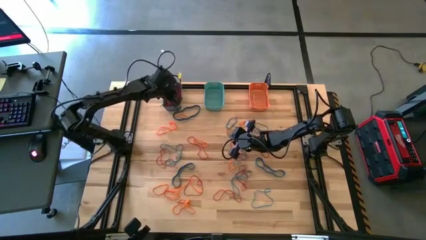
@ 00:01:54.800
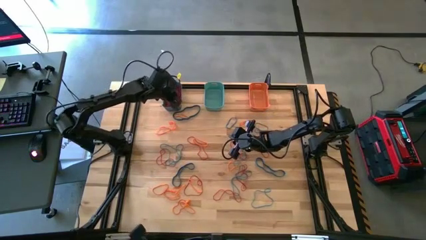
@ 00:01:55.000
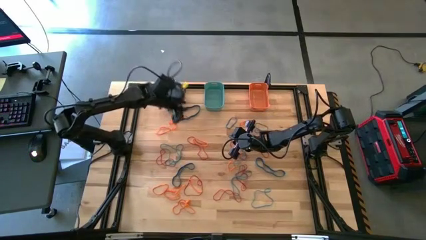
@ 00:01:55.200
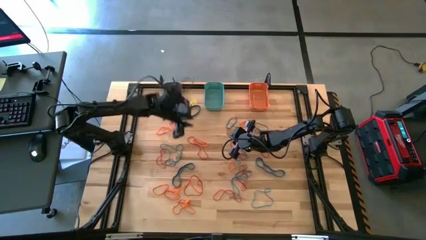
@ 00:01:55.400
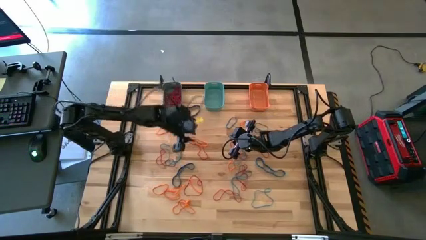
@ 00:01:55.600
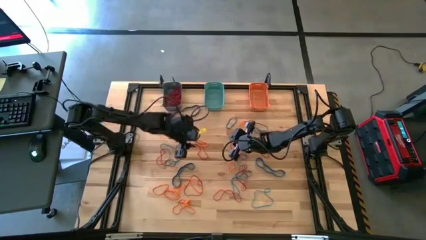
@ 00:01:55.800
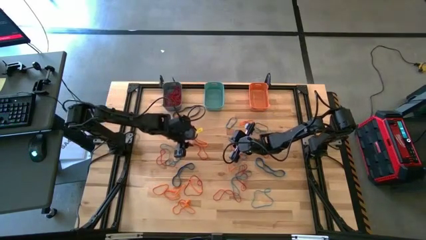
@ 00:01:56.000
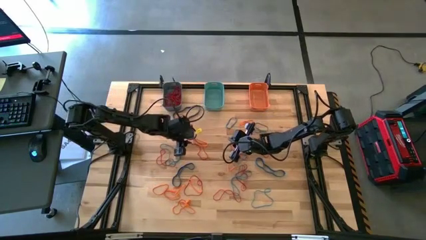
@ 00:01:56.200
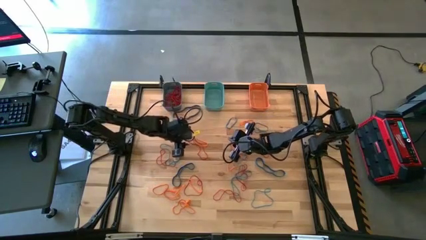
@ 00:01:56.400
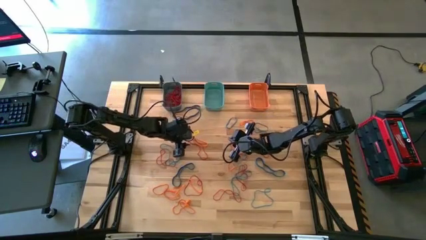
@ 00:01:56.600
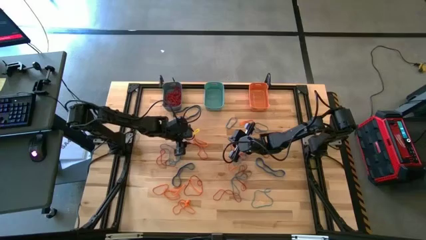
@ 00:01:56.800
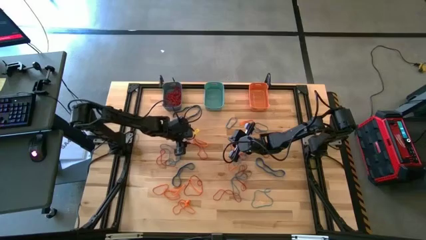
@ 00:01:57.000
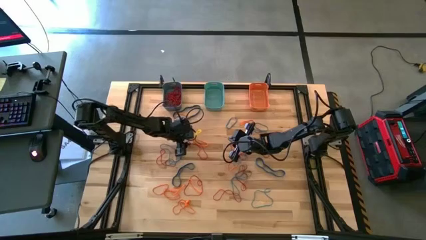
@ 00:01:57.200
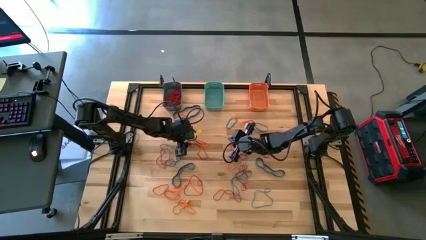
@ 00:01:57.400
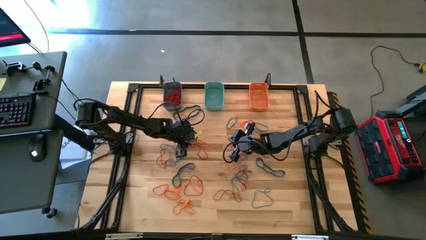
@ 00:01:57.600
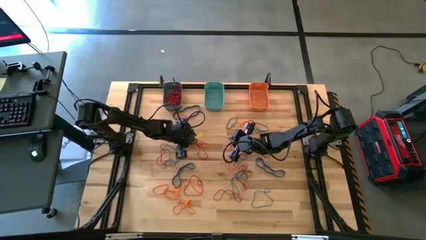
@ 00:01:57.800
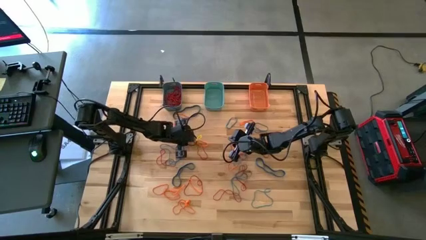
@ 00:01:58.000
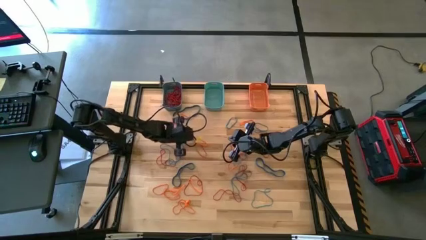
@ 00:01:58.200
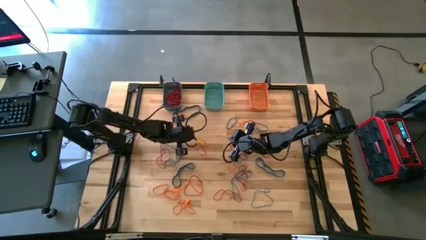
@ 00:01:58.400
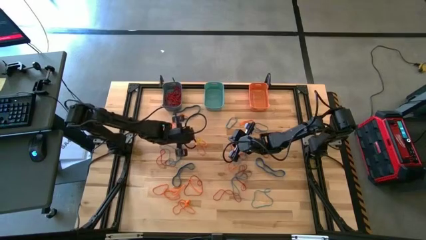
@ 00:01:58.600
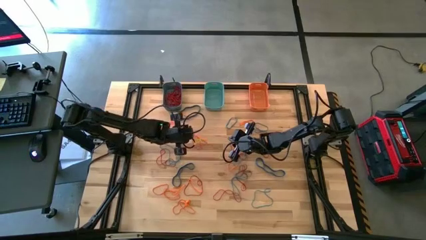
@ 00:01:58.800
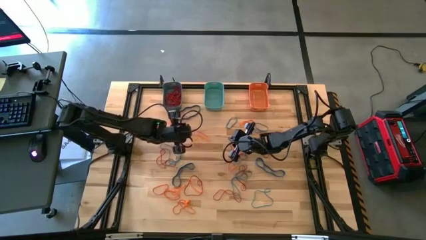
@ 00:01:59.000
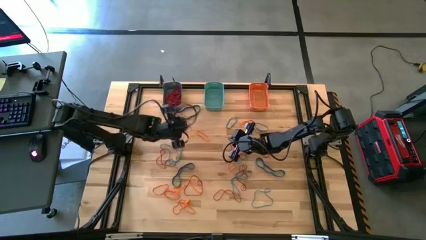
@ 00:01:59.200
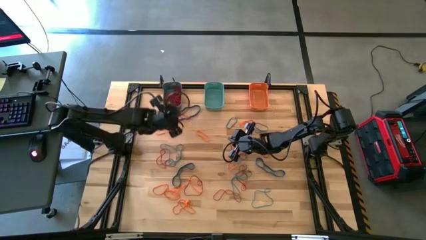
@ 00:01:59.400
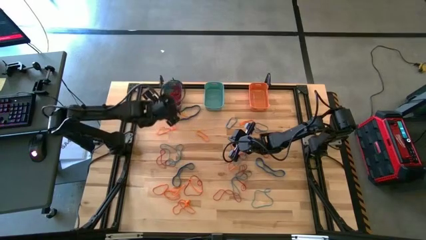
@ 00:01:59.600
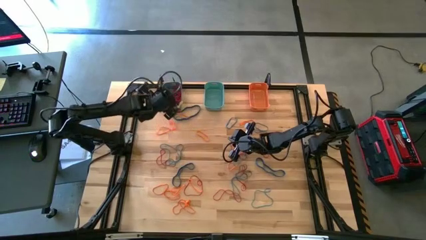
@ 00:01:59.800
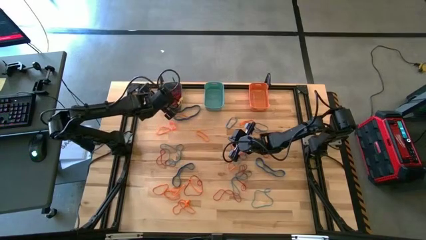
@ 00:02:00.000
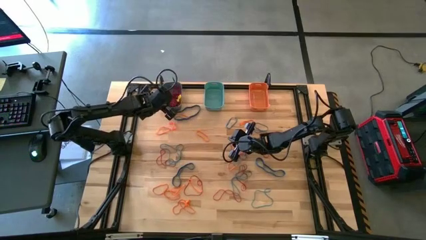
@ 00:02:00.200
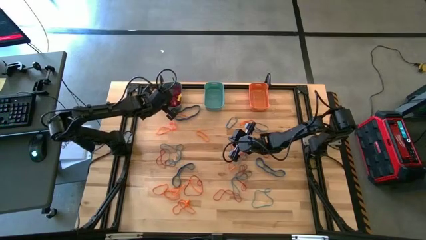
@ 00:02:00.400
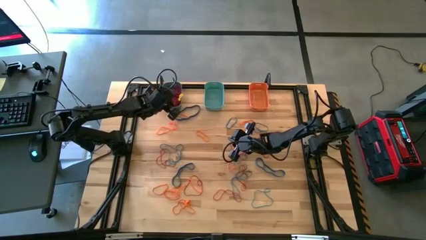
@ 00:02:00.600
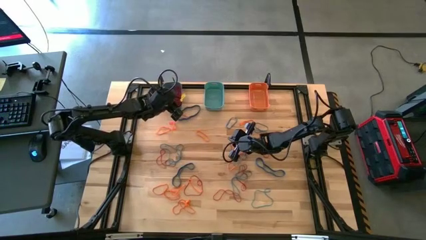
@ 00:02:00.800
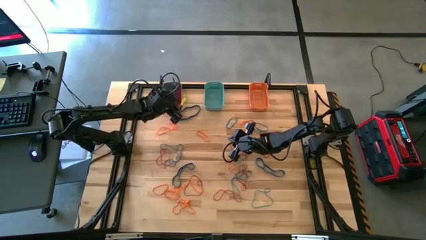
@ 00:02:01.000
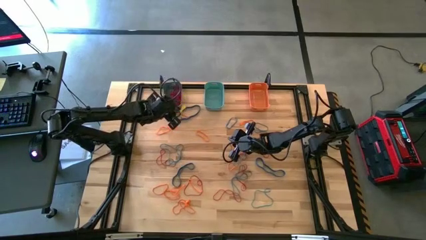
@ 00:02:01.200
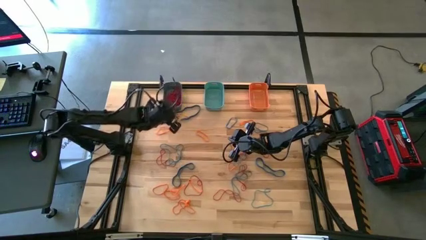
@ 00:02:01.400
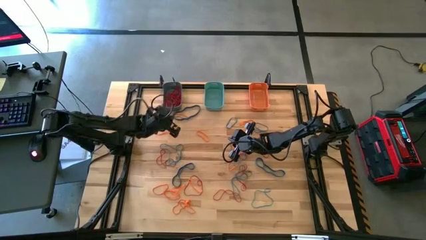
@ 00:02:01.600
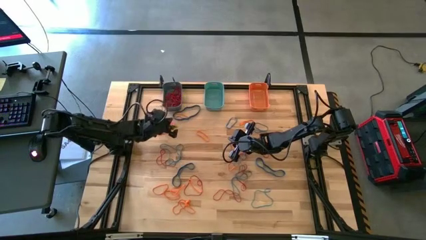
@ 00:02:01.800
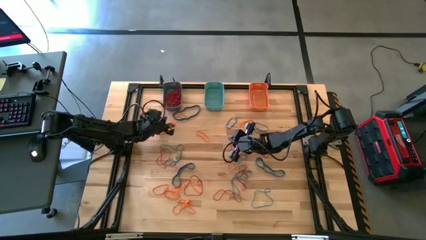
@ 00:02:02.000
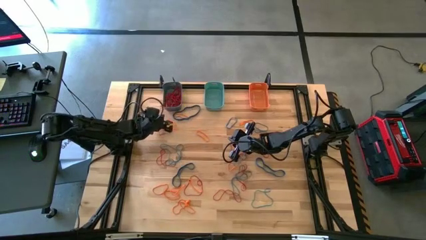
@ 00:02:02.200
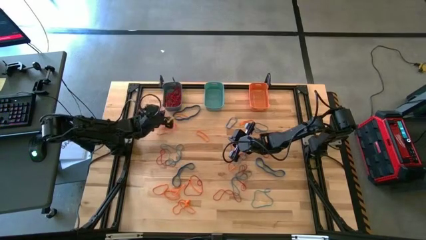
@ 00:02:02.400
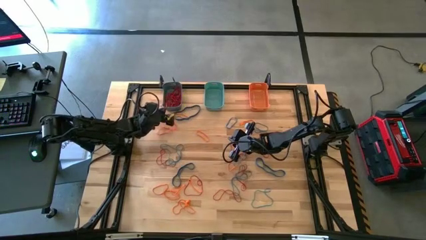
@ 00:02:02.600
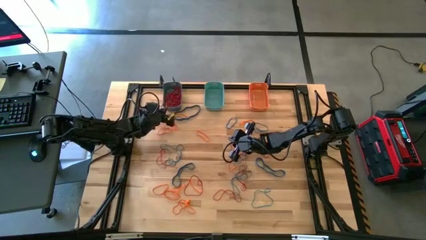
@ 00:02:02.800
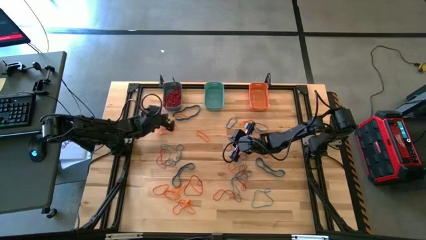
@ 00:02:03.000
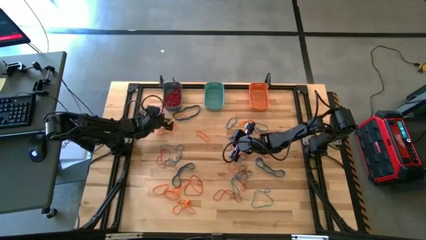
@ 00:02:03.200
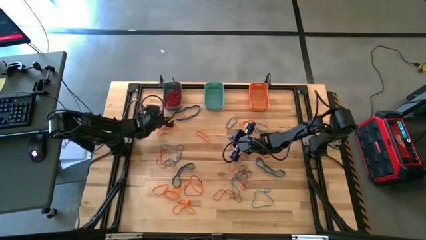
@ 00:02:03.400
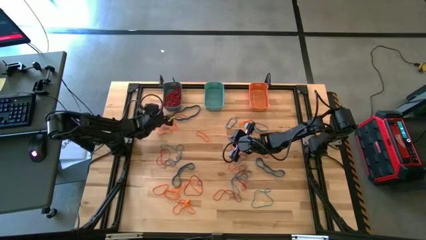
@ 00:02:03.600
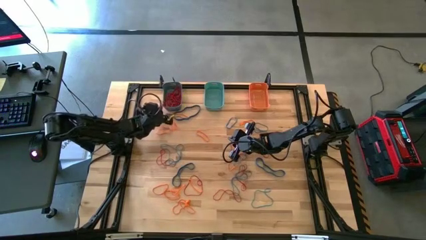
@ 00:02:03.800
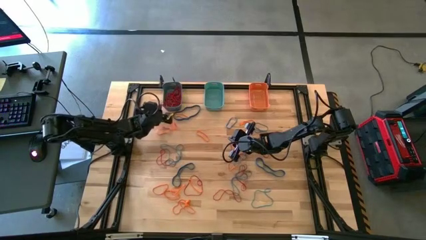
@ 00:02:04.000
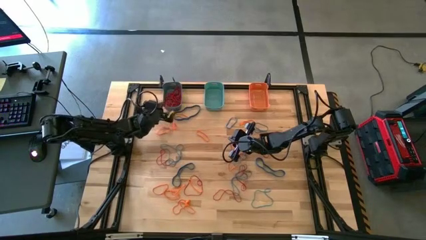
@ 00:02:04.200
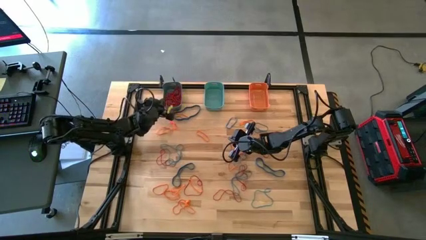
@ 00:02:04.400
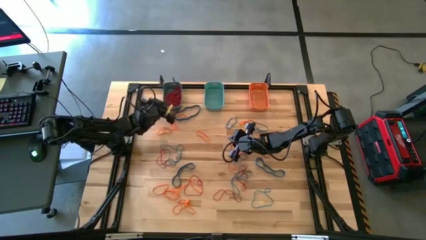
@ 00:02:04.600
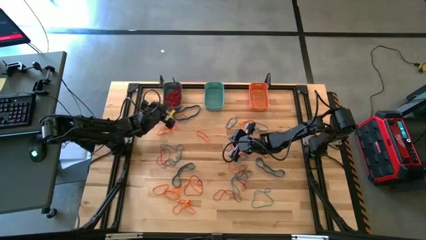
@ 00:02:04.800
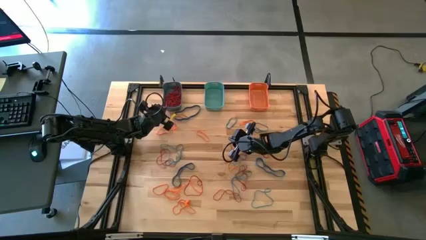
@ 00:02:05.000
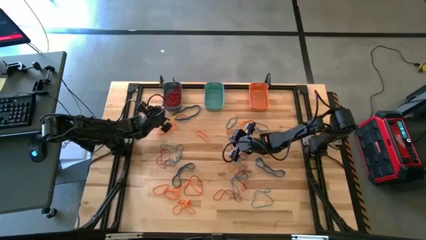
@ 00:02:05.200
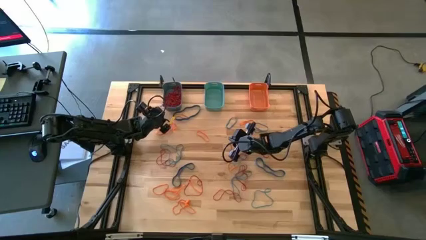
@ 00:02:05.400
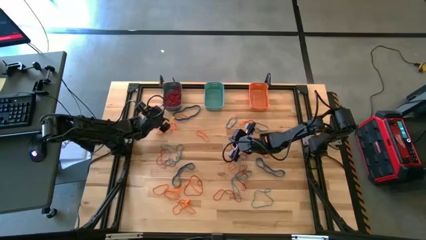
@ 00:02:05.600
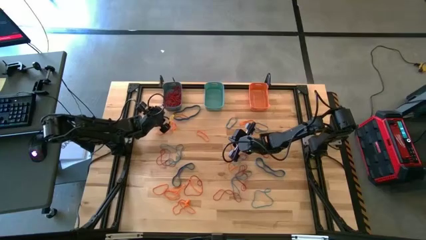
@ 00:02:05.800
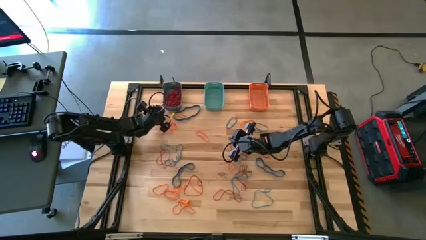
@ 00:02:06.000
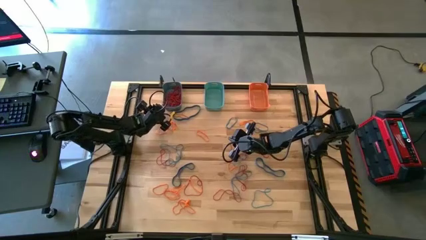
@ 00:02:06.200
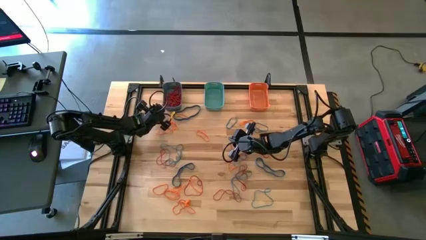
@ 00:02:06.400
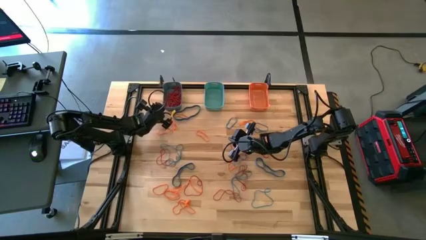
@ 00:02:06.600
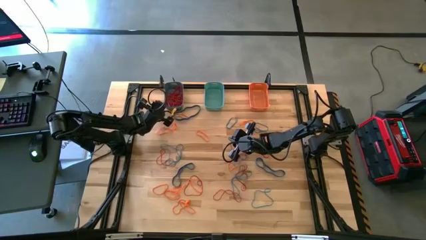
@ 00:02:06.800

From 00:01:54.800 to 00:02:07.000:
Task: Sort rubber bands into baskets
Put the red rubber band into the blue bin
